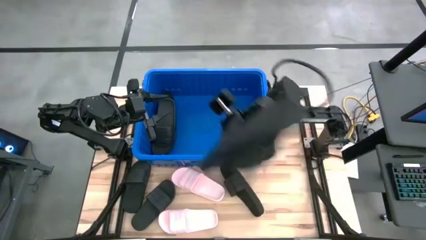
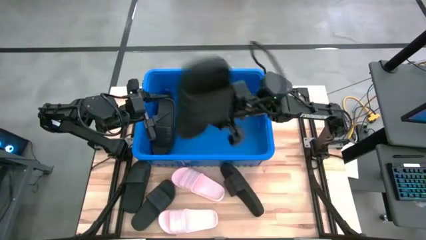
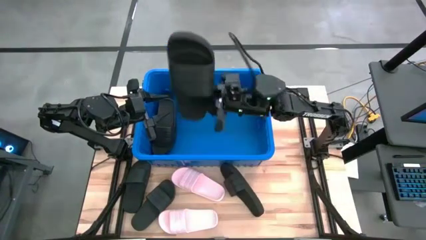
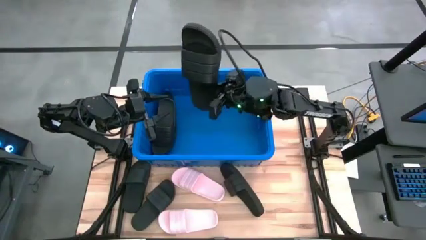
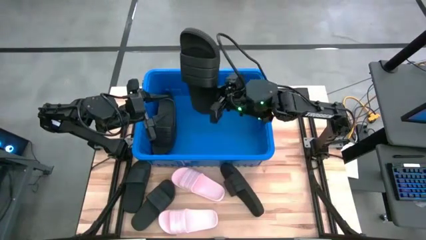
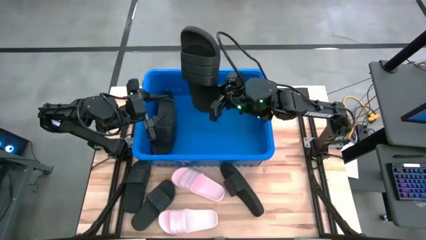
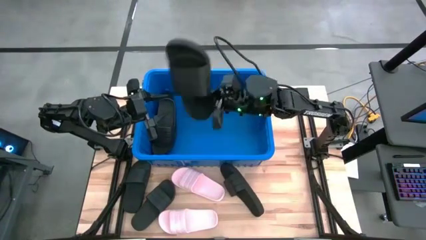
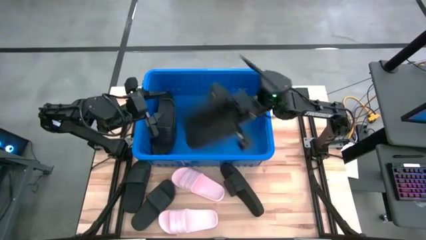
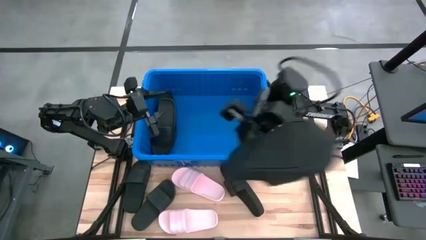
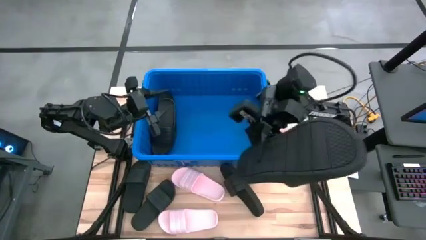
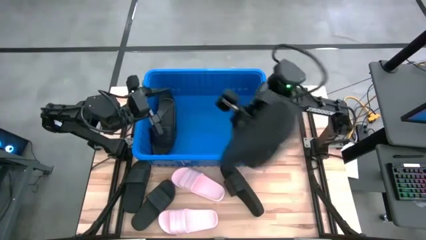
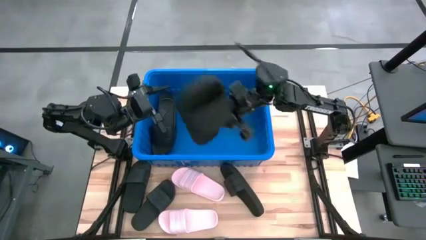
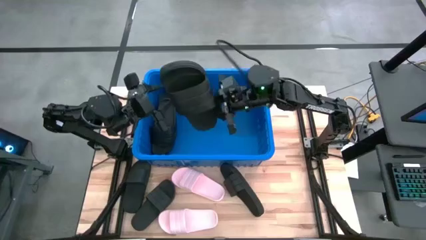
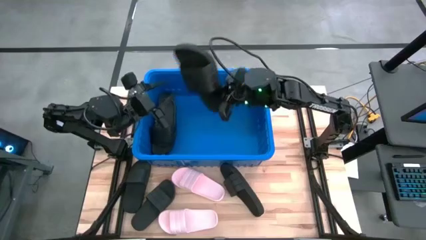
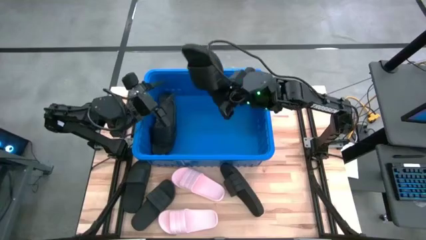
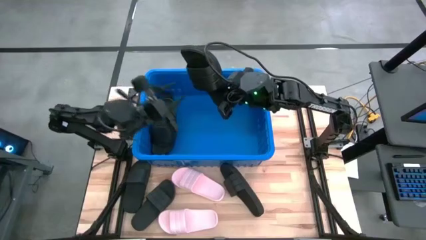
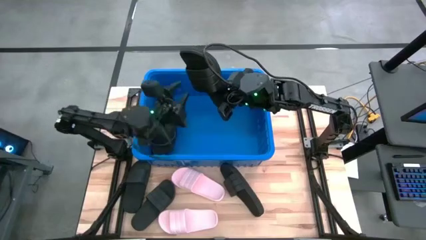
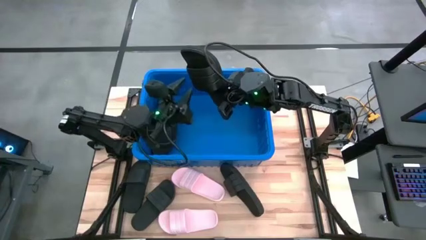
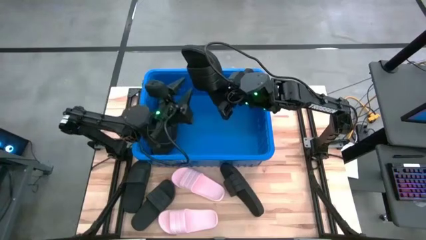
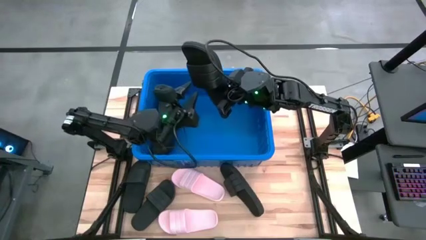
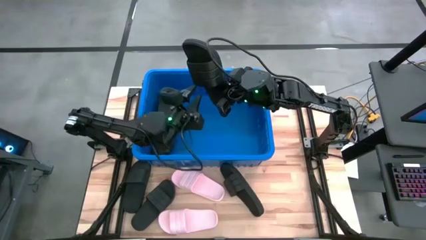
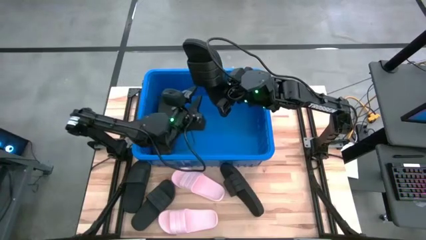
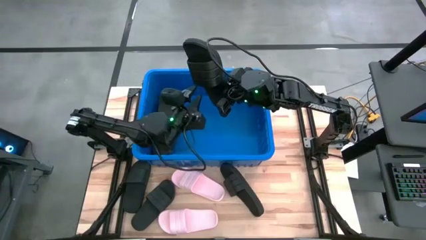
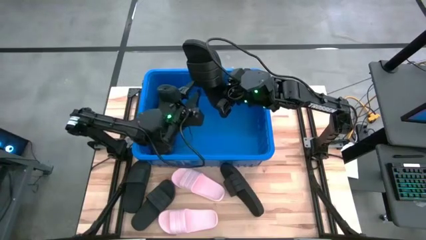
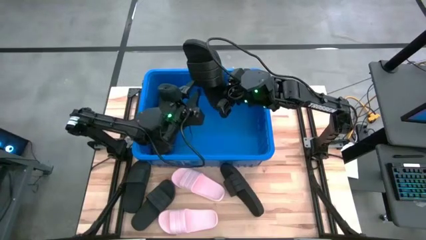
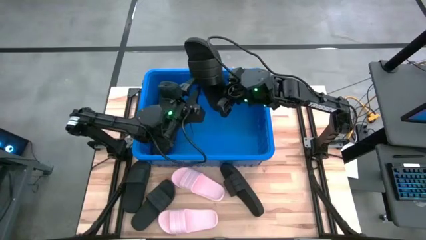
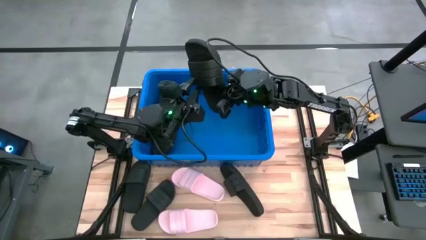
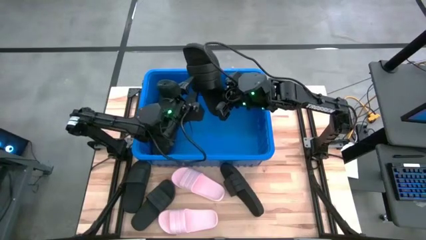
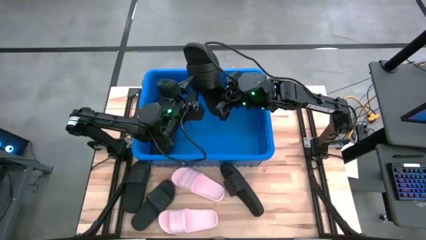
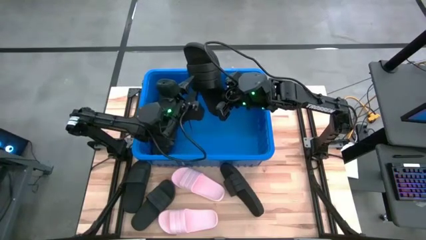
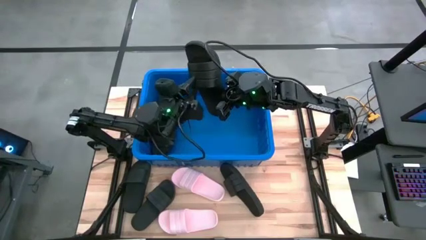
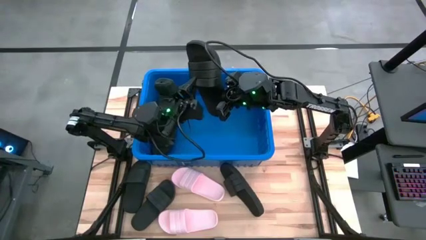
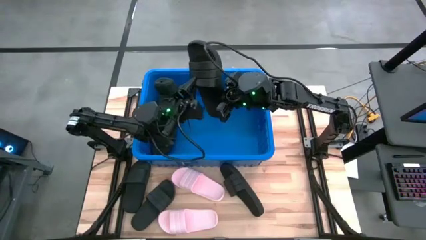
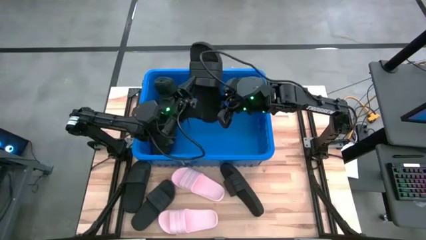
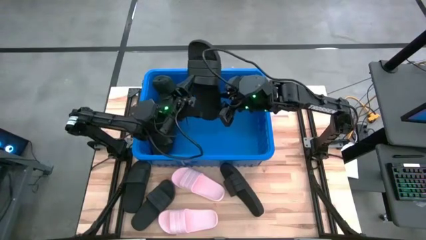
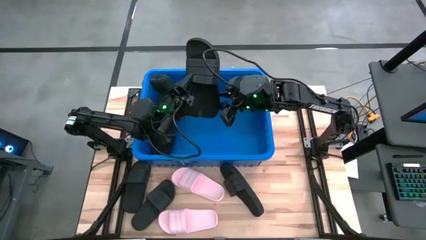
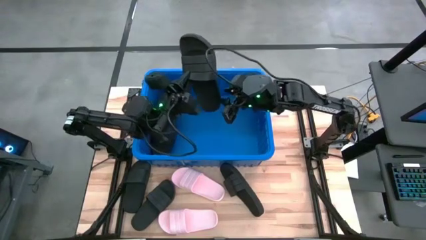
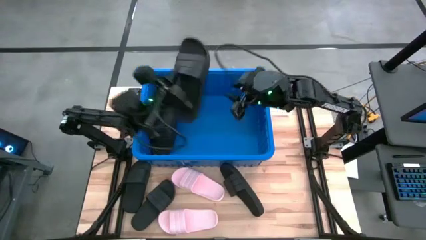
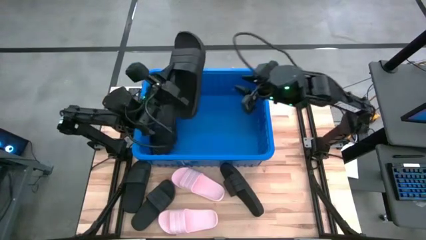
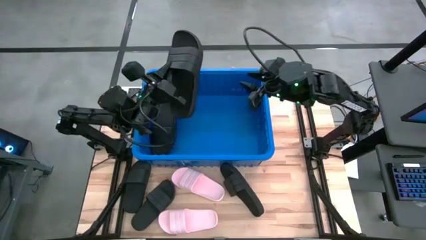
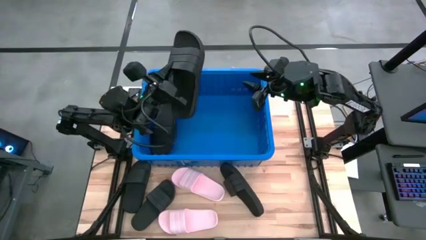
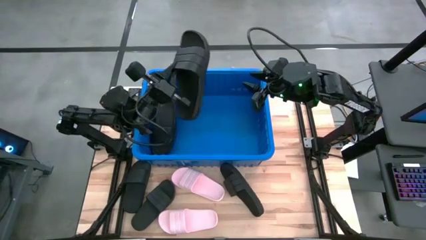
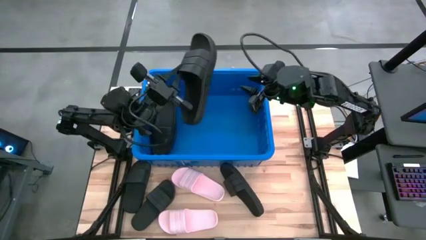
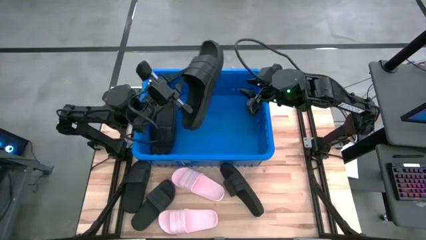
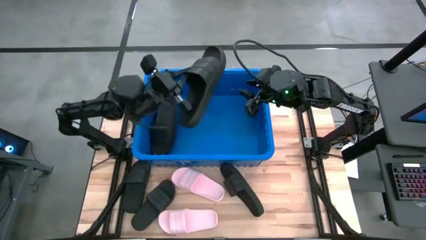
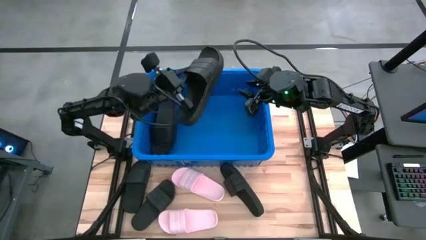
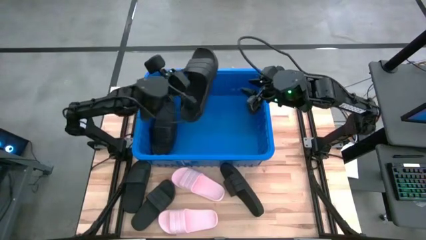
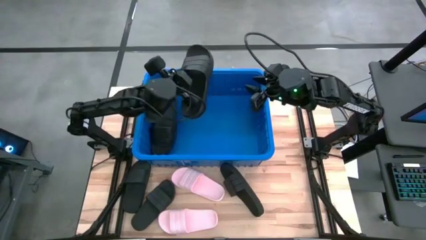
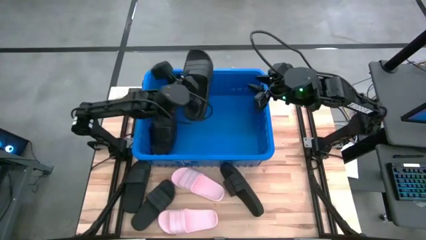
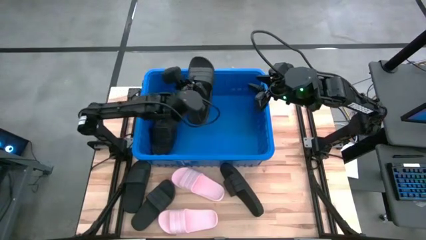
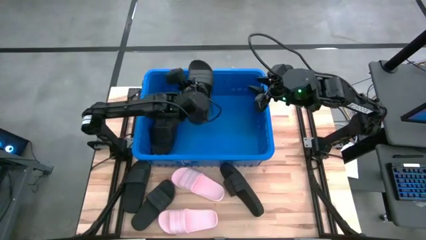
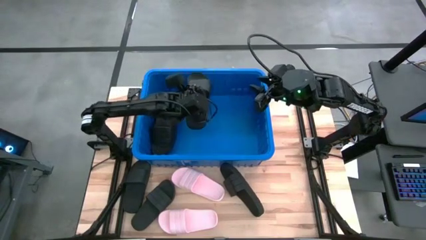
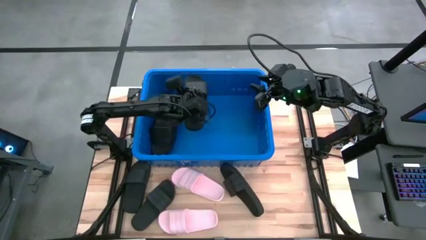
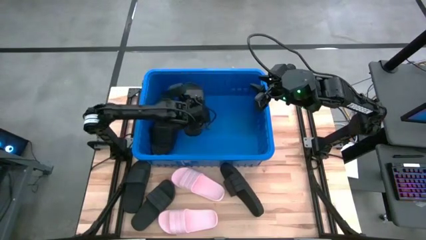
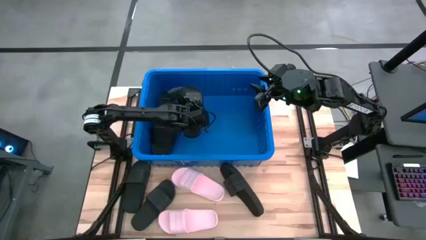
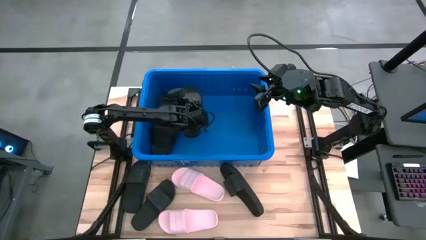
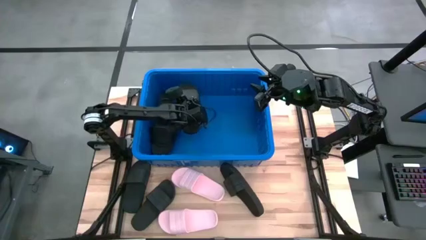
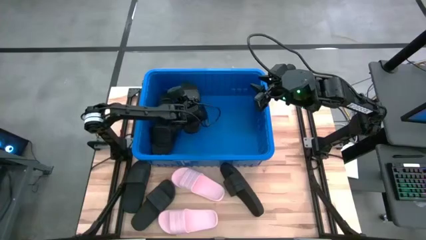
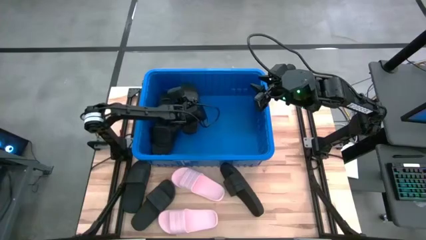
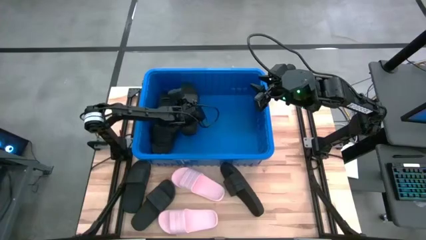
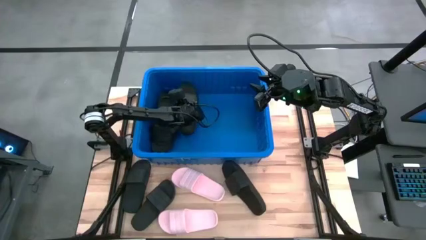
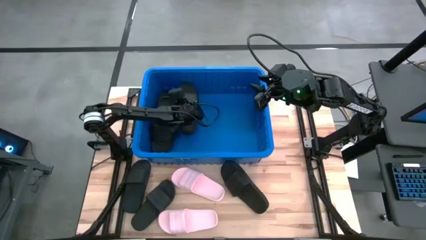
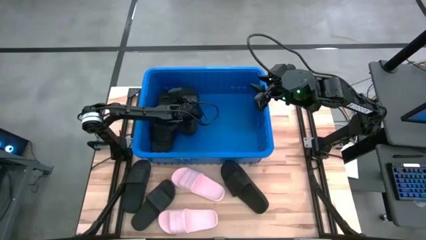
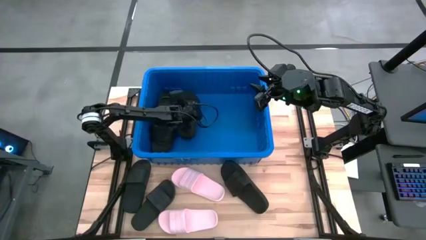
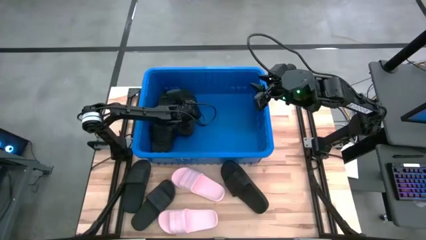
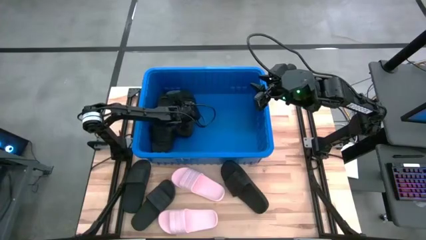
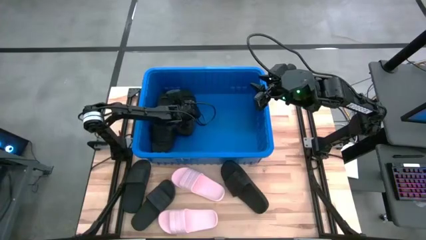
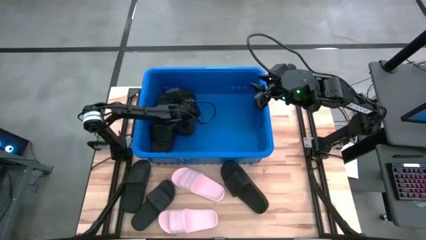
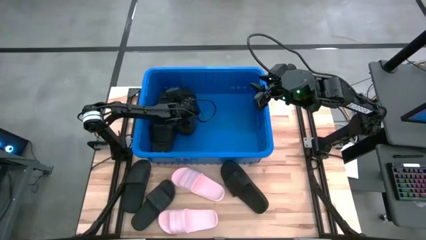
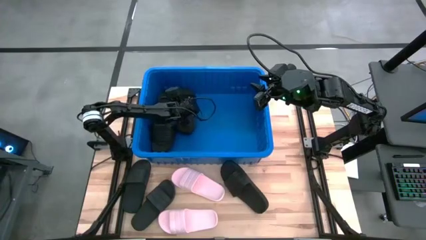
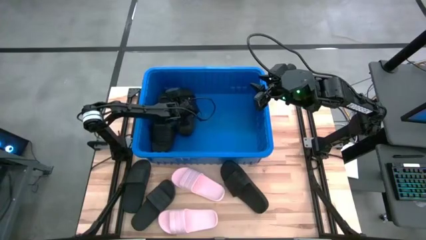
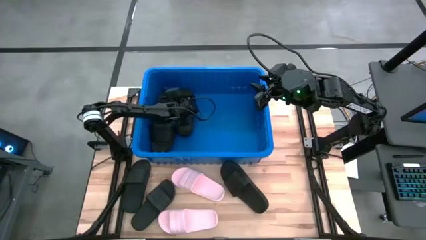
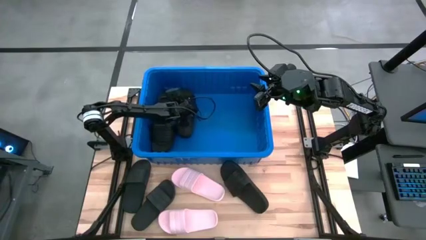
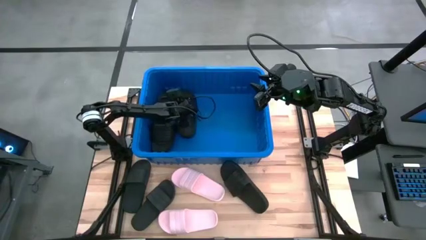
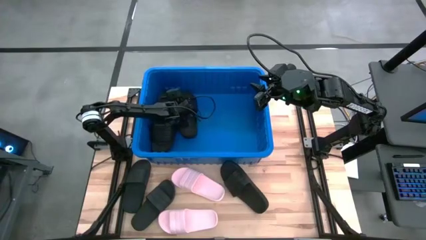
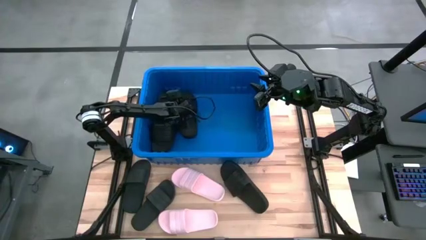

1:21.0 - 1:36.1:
Task: Pick and place slides into bin
Put the black slide into the blue container

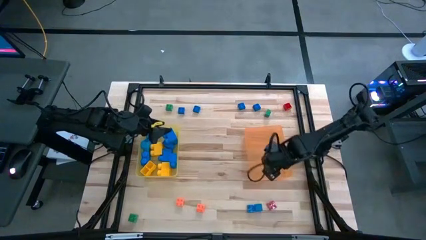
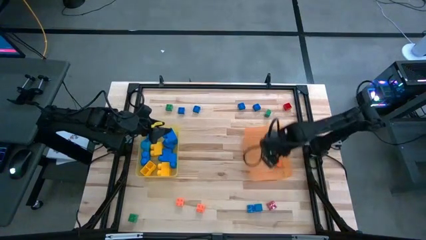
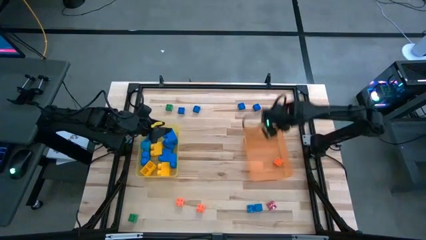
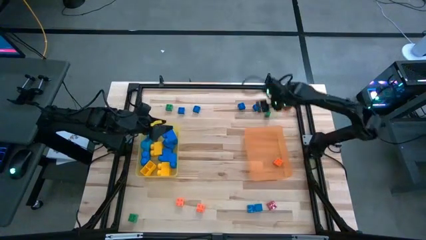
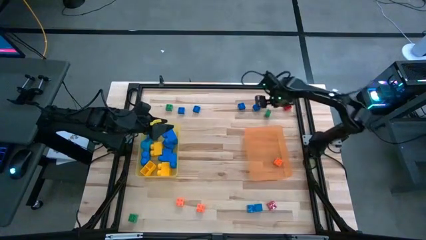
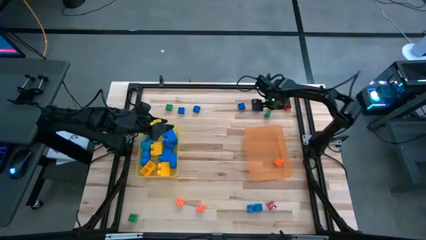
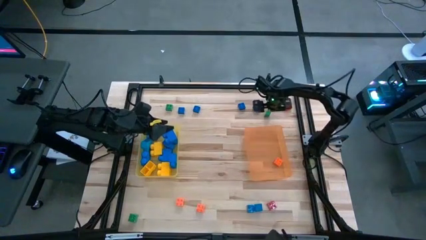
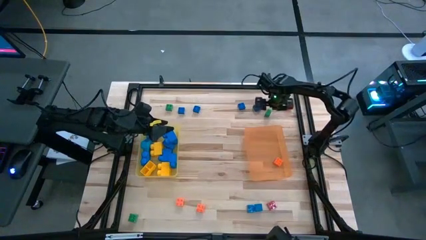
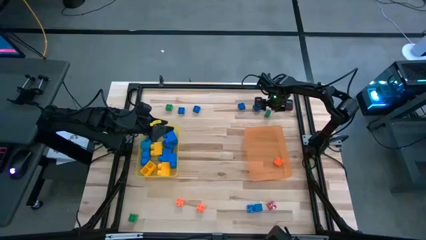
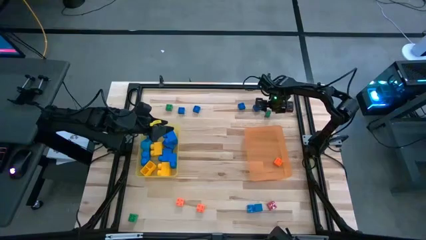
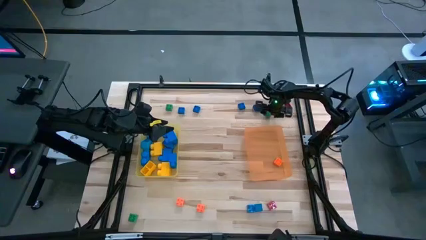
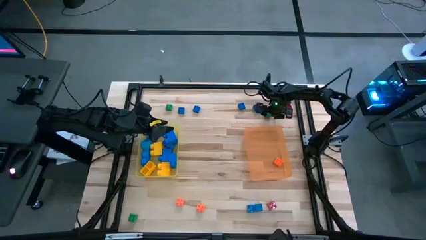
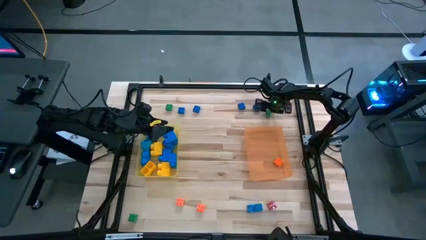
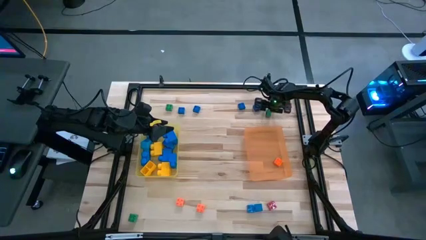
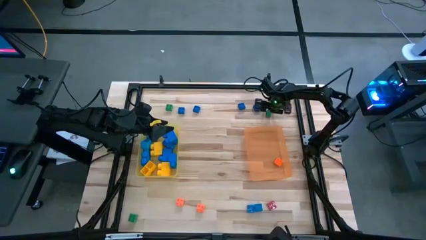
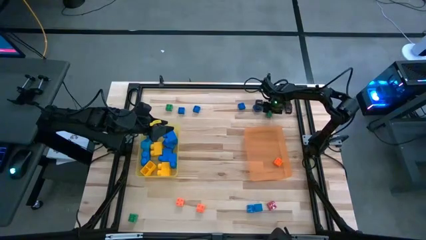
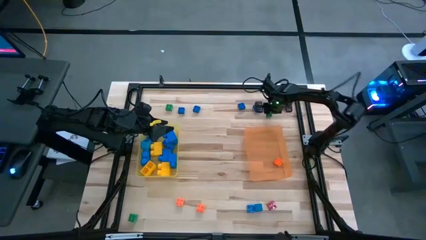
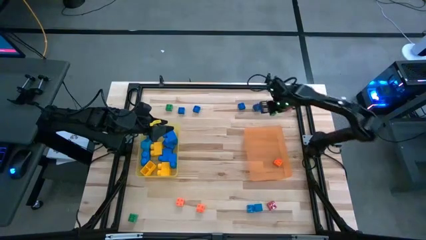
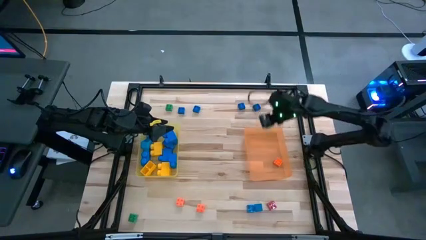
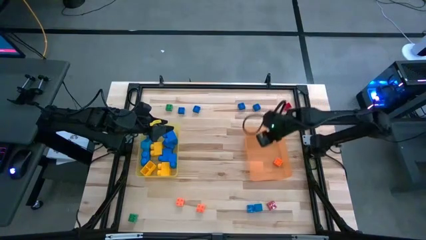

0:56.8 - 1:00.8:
Task: Sort blocks by size
Put the small green game piece into the orange bin
